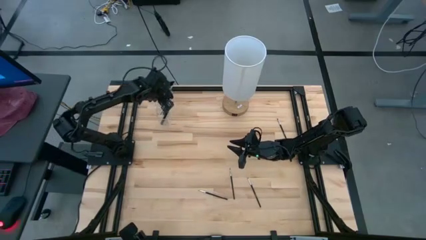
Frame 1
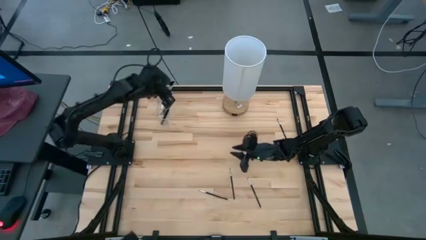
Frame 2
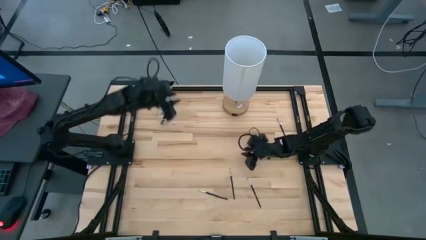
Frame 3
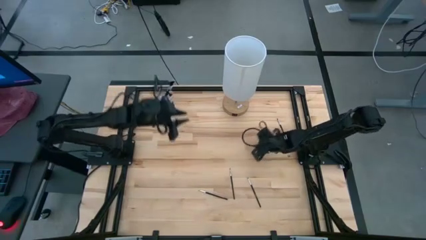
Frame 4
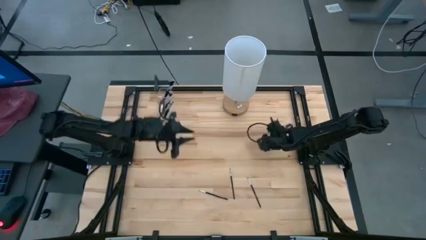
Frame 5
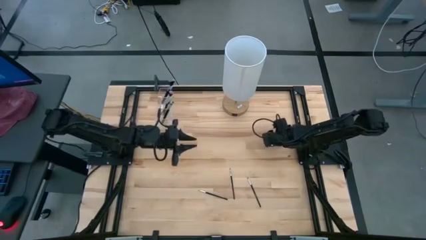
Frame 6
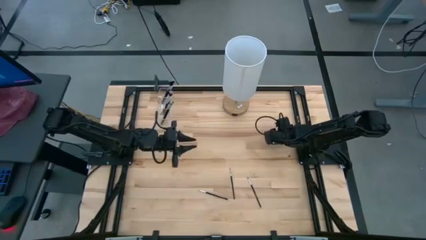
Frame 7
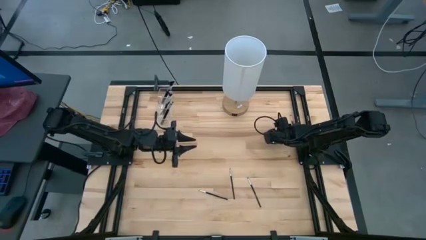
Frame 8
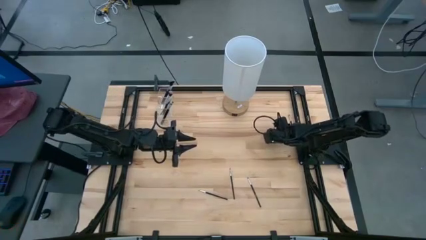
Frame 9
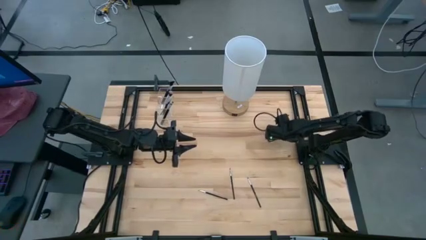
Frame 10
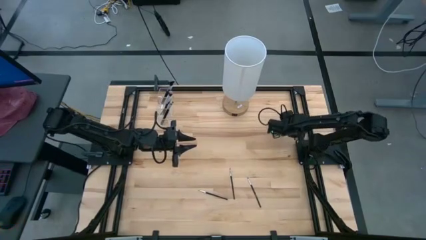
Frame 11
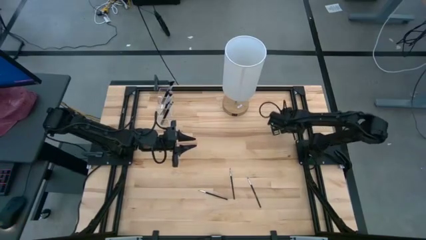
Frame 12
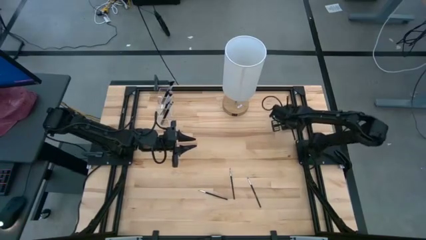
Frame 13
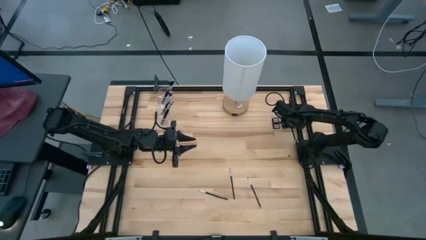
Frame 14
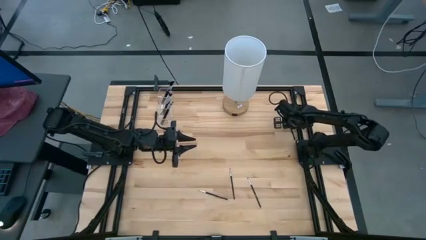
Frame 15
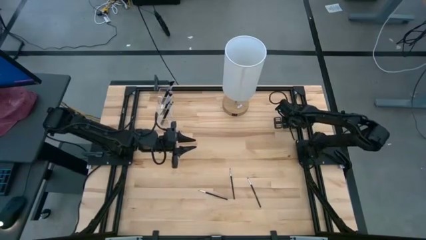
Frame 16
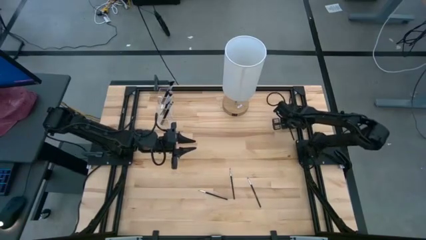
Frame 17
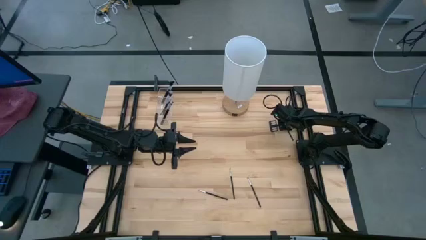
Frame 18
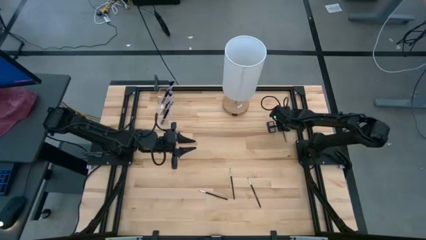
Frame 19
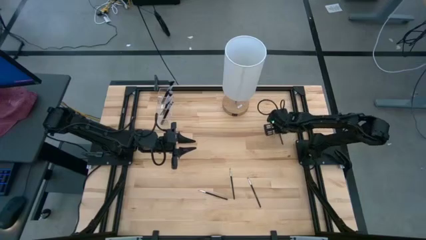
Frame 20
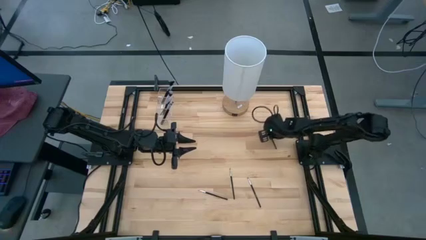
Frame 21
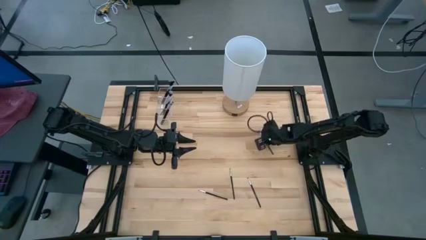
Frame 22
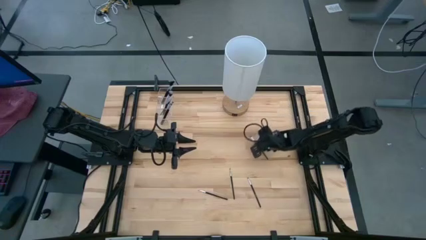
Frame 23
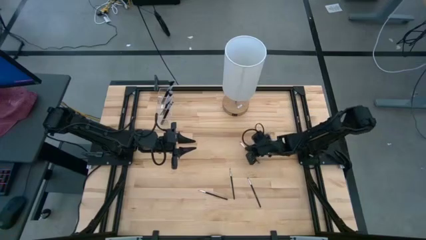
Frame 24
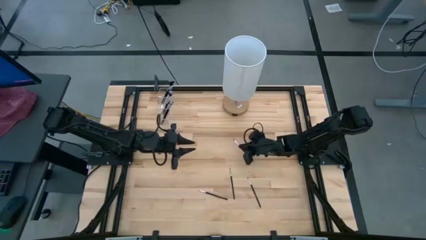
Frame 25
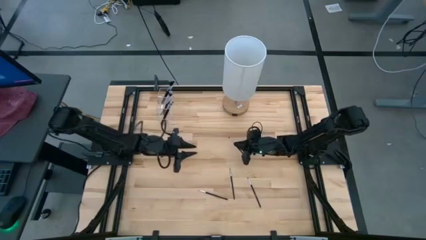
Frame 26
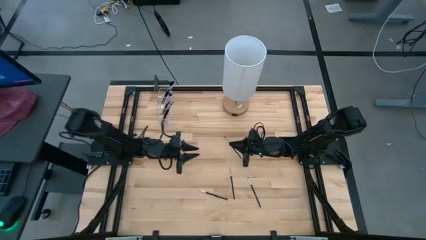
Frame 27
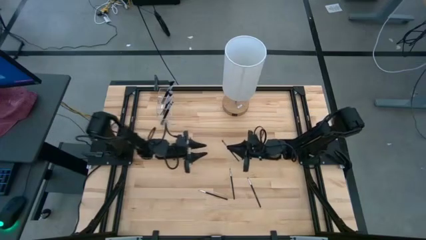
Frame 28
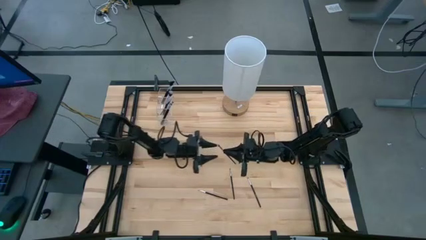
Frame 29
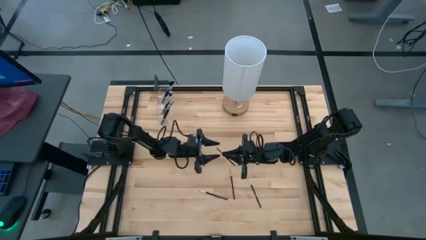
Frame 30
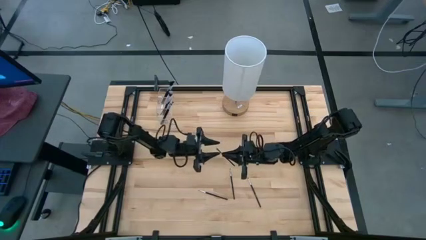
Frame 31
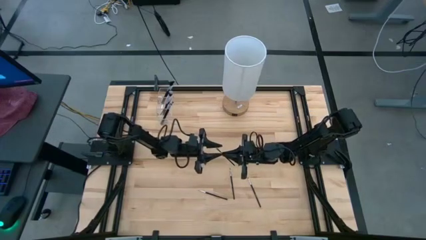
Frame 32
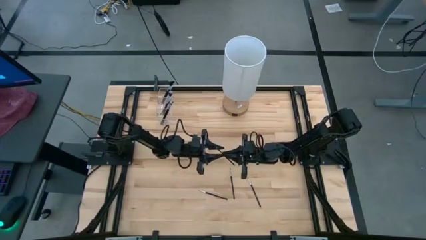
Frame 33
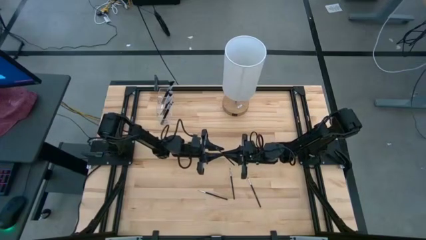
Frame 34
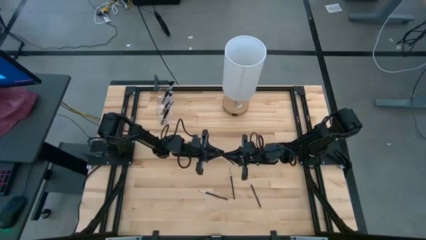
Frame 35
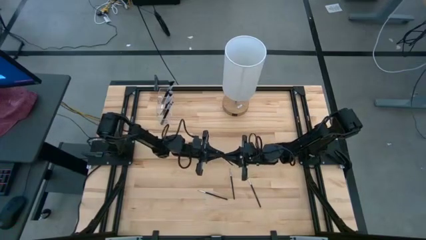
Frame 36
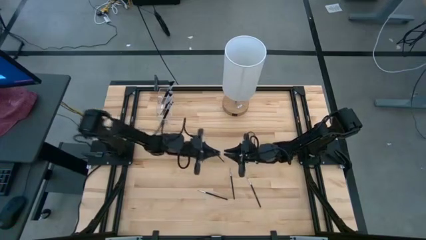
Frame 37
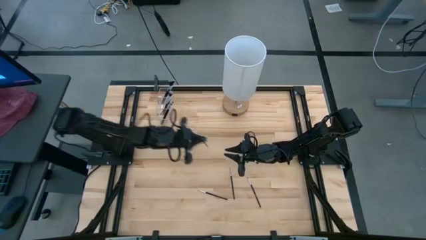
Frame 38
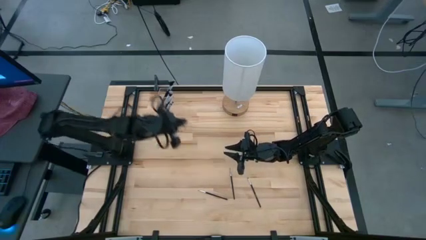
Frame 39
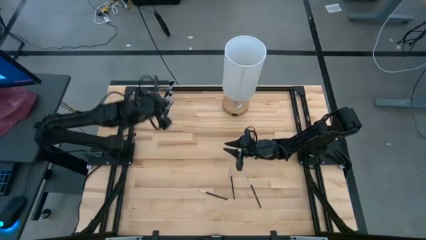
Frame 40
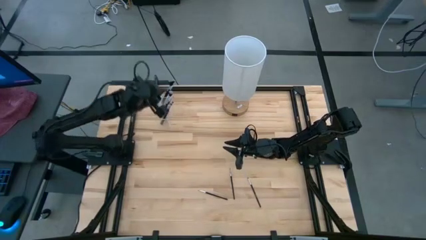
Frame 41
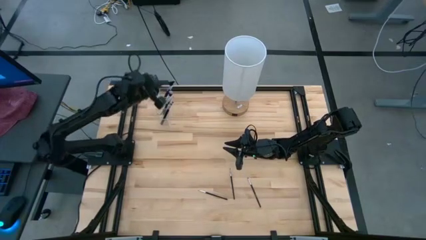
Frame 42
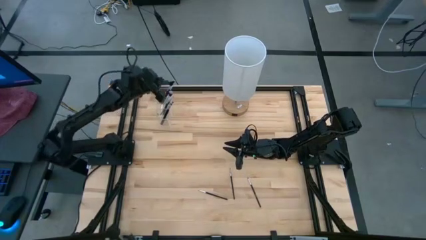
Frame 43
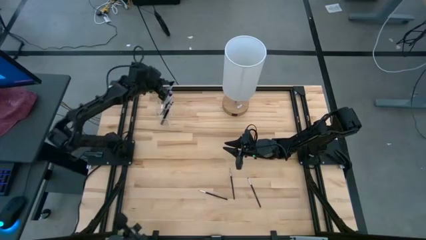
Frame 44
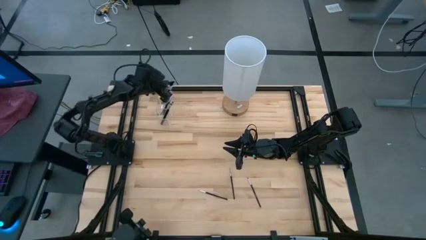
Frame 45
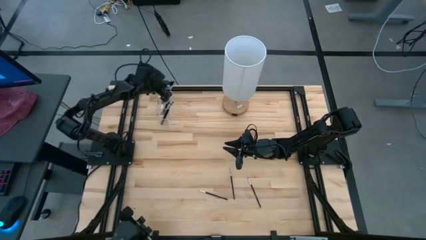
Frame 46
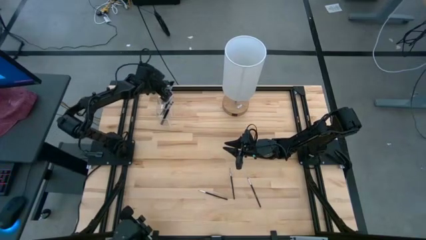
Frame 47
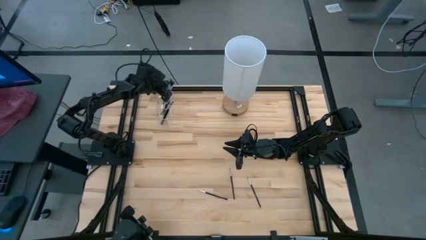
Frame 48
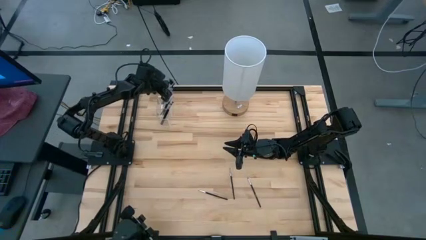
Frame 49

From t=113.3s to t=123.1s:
Task: Put items in baskets/containers
Put the black eyeshadow brush into the transparent organizer

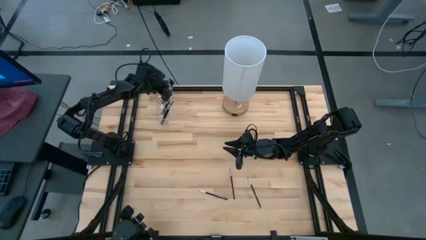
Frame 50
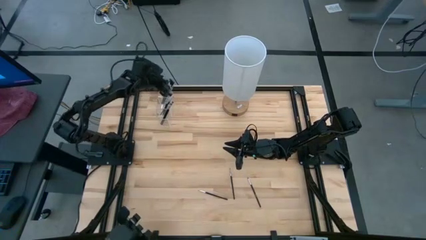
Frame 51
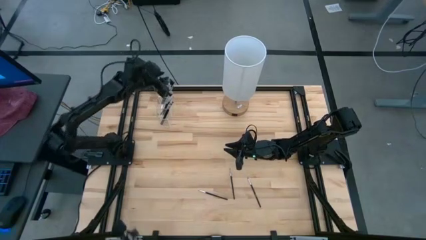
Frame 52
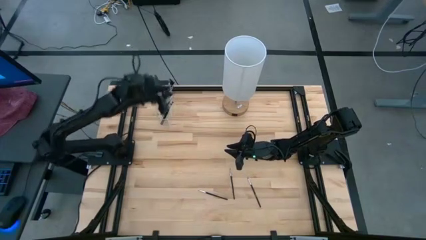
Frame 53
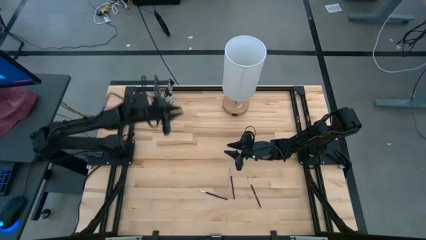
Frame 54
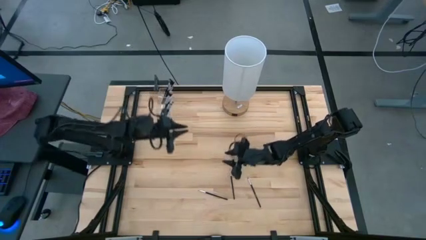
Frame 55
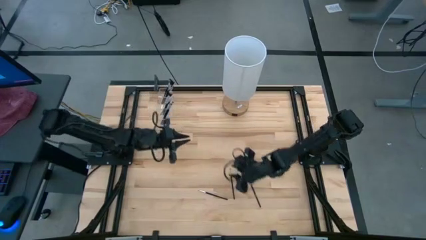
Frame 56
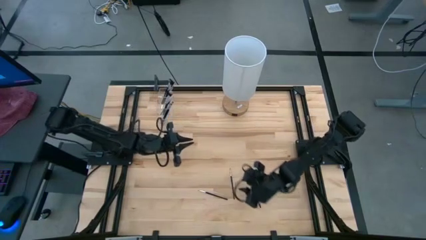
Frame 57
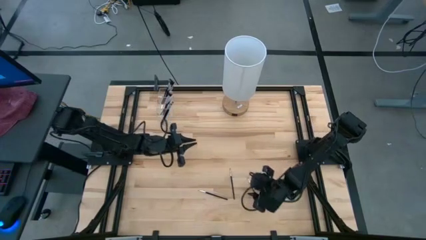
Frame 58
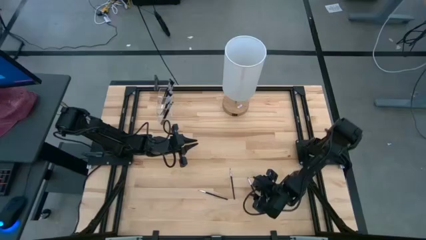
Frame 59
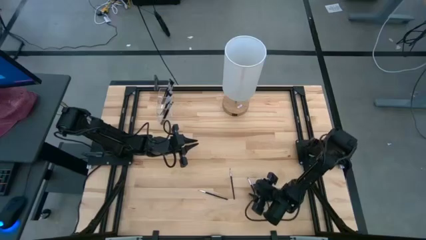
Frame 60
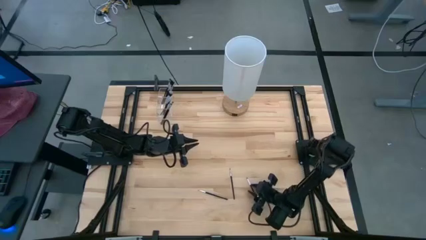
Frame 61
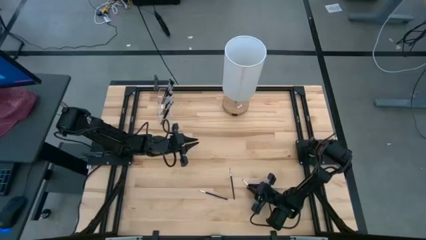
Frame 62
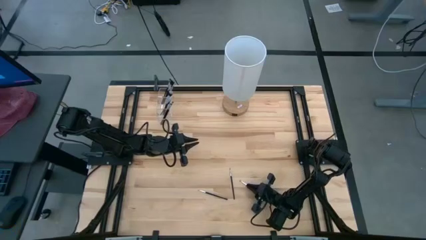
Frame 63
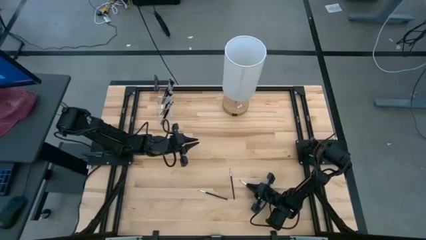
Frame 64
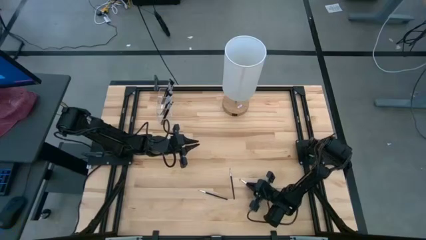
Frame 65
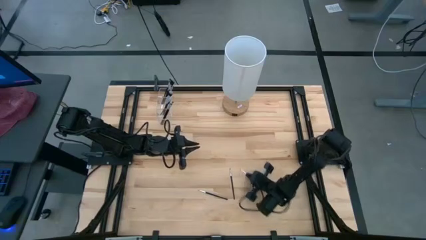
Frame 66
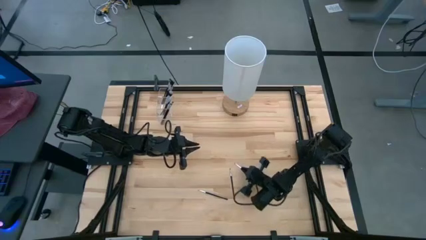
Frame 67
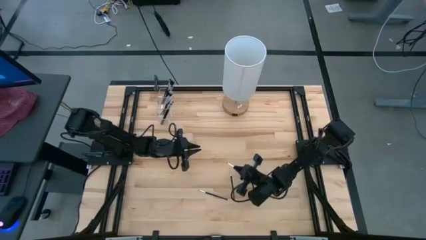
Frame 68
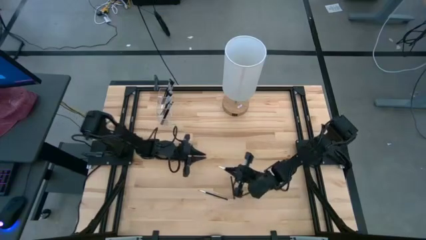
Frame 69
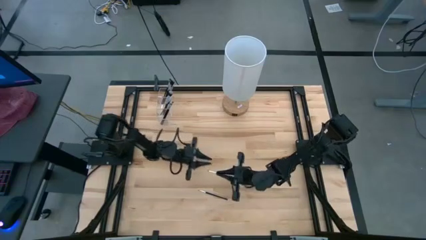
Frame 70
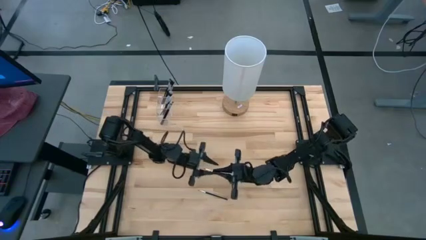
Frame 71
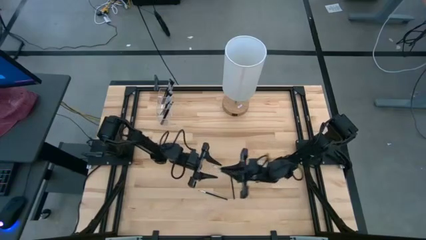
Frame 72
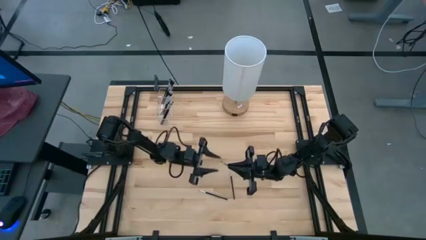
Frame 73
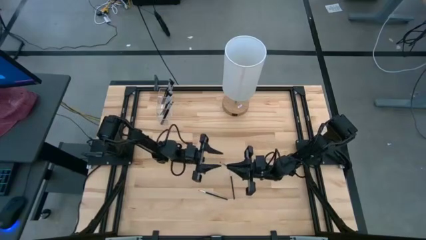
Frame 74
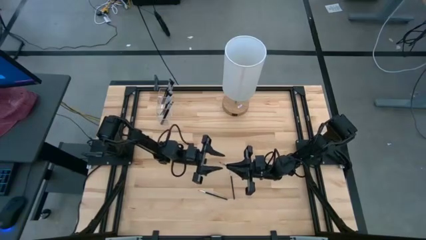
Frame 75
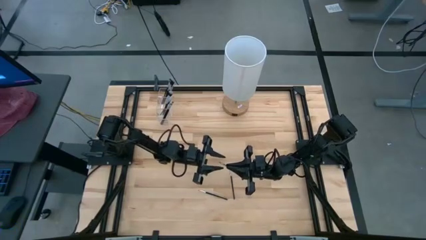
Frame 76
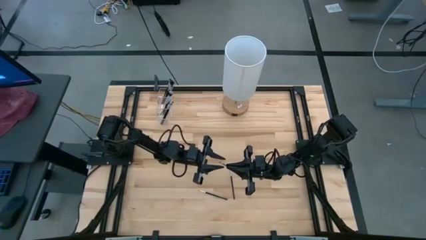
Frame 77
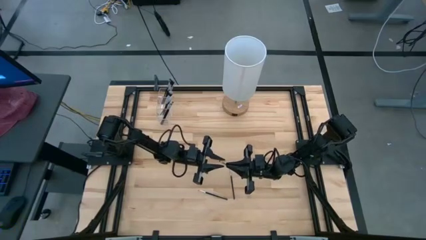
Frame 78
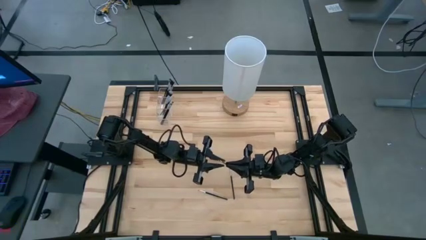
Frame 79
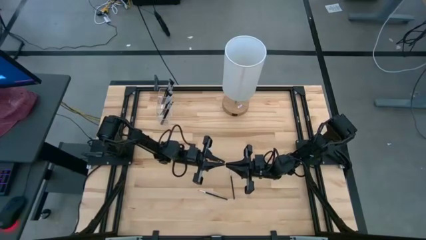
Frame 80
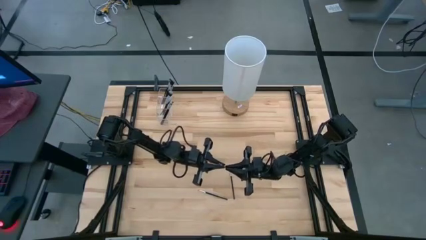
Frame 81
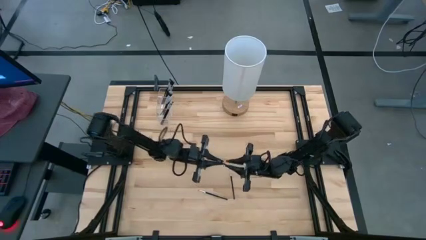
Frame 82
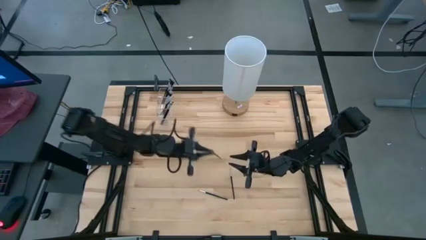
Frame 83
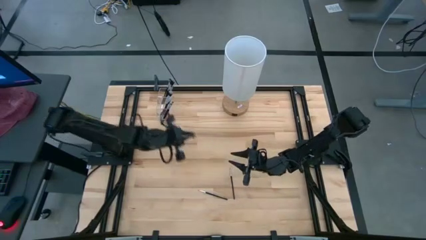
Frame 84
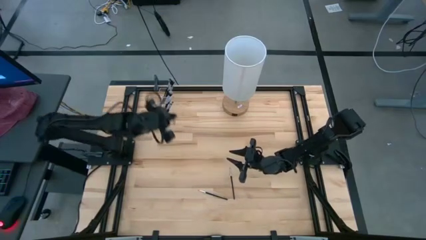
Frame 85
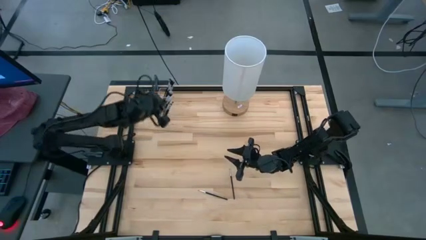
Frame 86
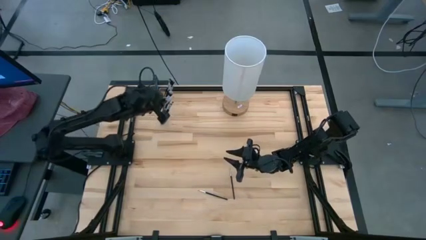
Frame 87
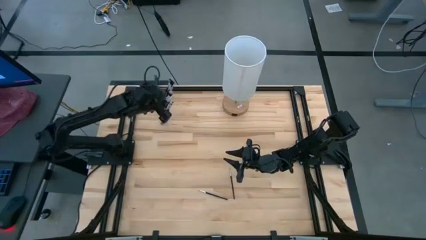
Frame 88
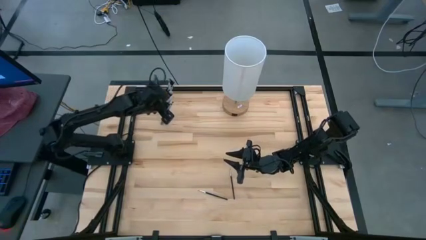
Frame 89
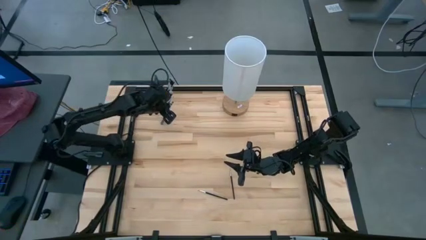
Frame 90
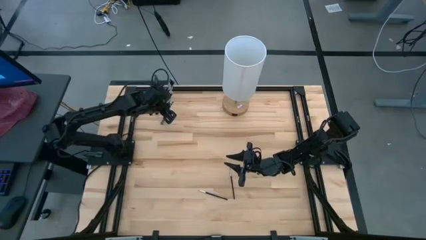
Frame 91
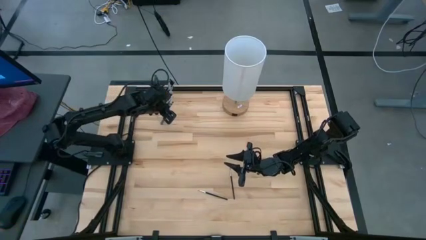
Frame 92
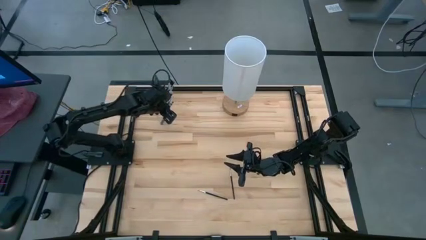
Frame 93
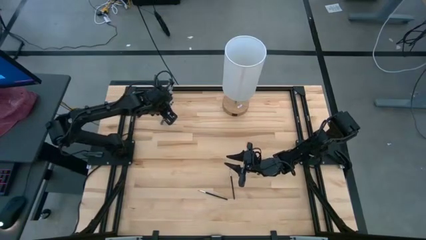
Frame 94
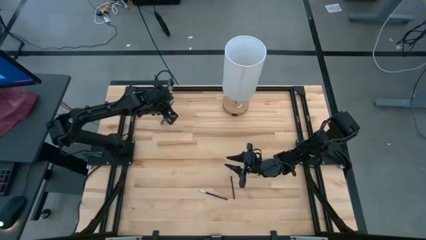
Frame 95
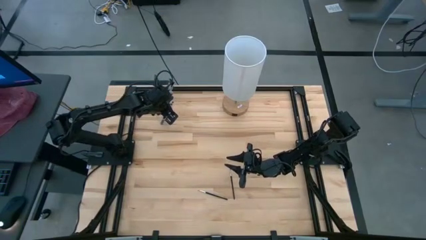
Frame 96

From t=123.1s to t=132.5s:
Put the black eyeshadow brush into the transparent organizer
